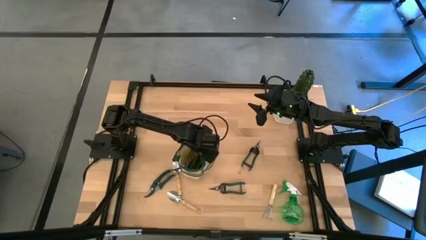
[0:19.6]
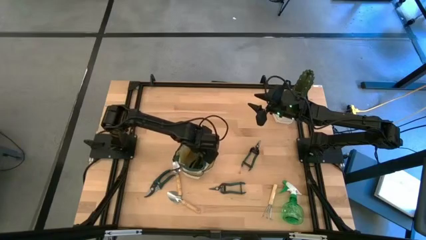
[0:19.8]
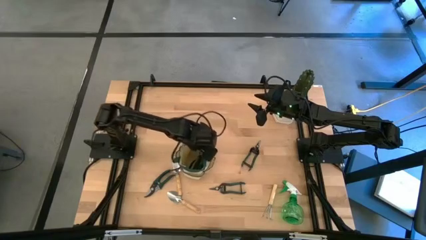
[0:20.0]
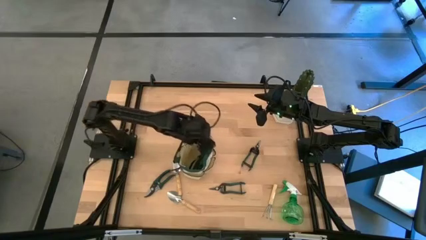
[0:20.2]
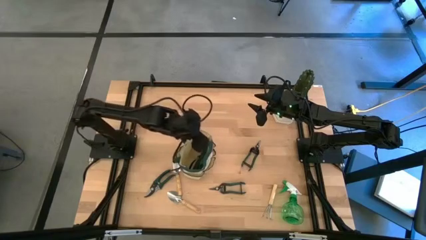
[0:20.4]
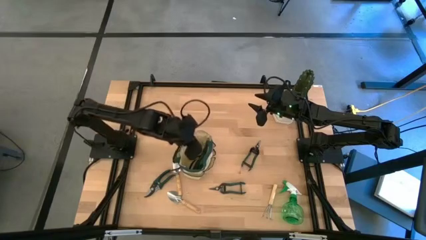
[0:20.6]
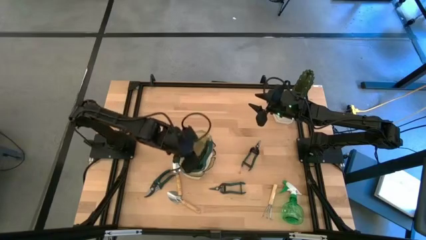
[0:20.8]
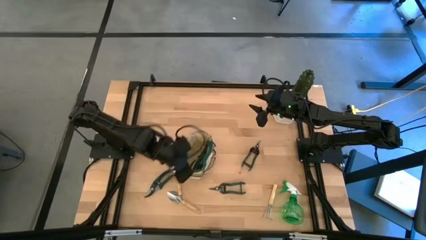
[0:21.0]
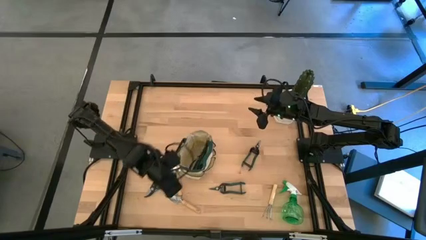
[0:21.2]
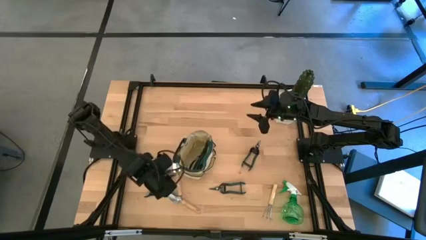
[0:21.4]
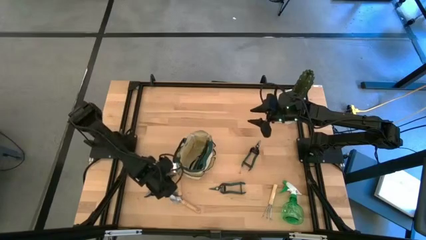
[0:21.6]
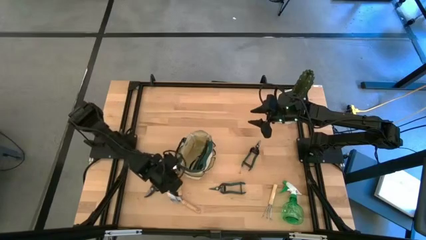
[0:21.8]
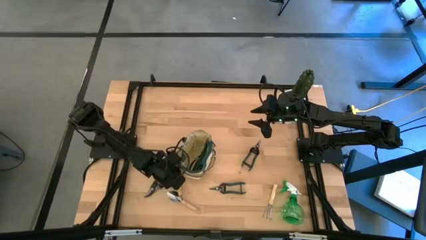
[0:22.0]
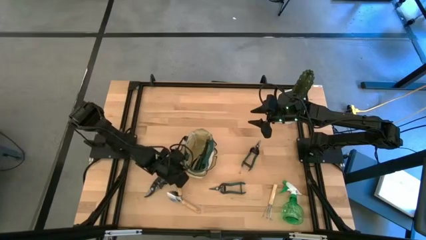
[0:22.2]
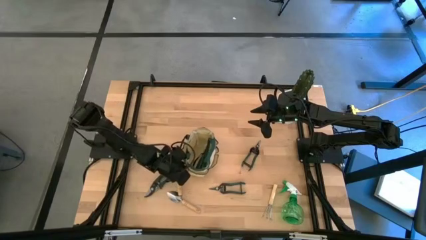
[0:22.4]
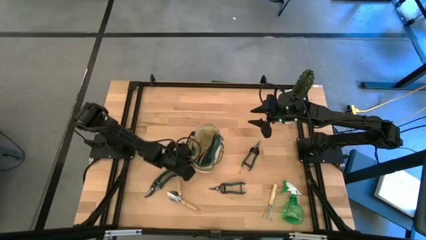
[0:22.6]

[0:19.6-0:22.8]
Task: Pick & Place Garden tools in Gardening bag
Adjust the green gardening bag

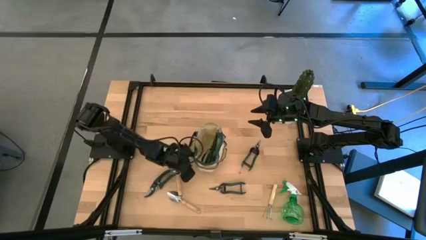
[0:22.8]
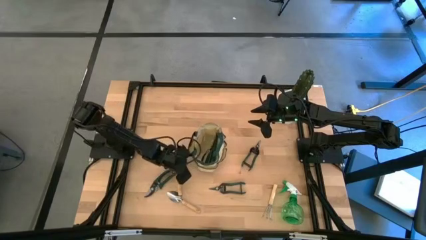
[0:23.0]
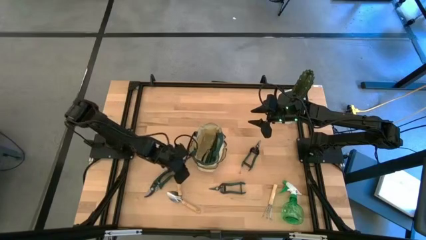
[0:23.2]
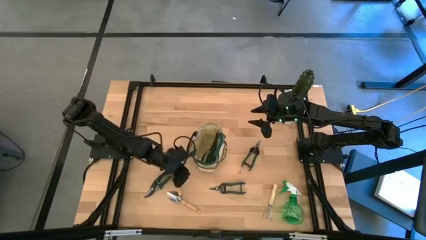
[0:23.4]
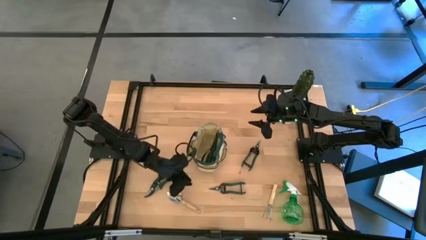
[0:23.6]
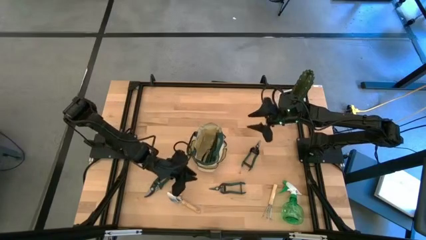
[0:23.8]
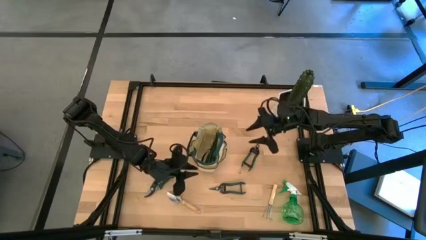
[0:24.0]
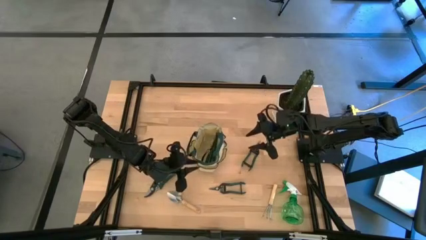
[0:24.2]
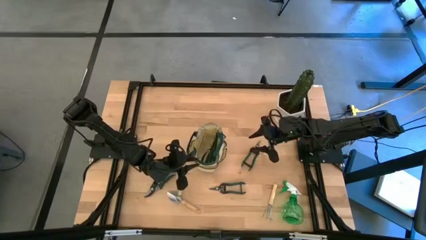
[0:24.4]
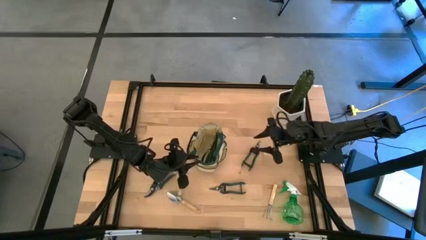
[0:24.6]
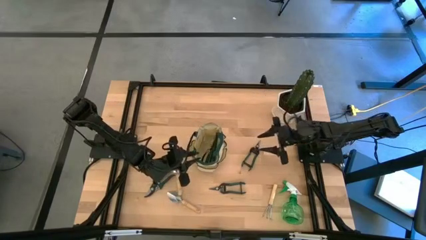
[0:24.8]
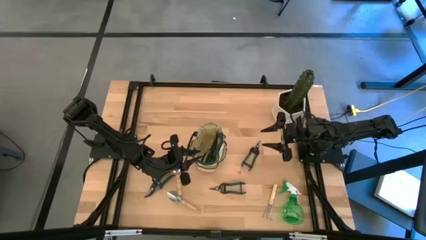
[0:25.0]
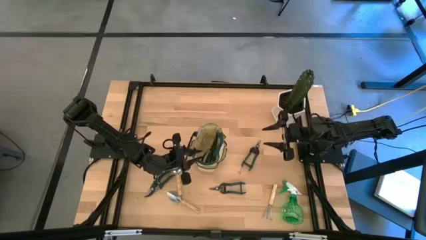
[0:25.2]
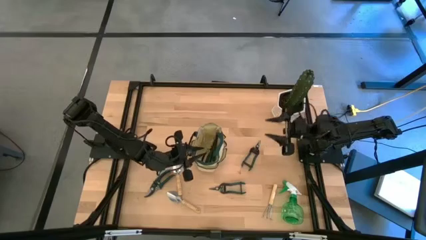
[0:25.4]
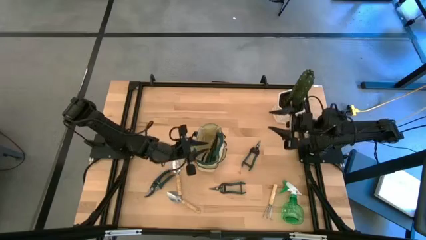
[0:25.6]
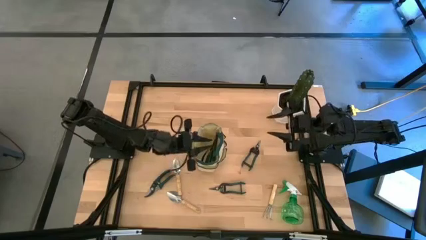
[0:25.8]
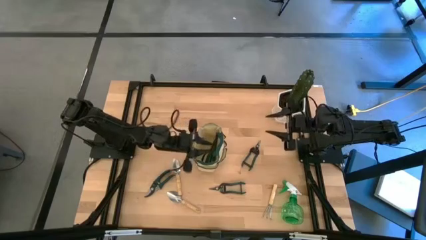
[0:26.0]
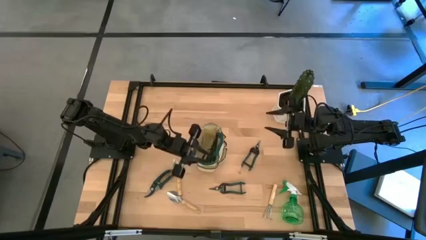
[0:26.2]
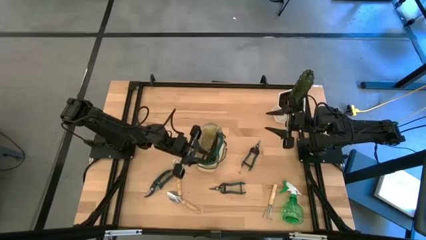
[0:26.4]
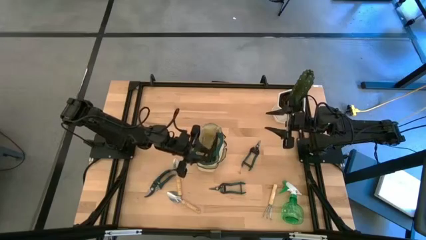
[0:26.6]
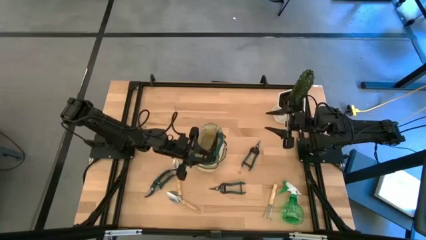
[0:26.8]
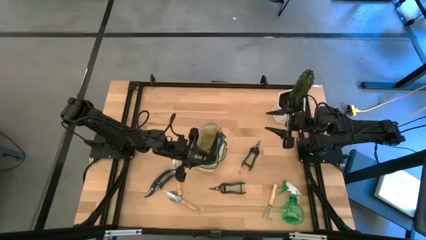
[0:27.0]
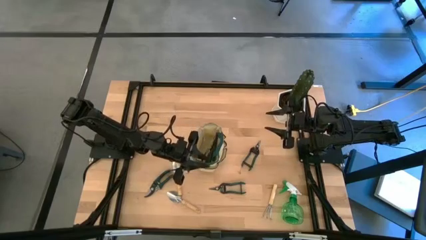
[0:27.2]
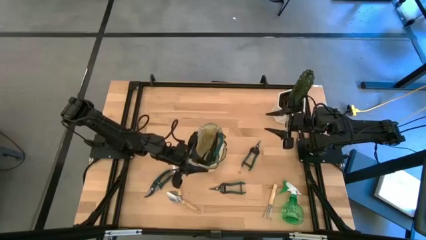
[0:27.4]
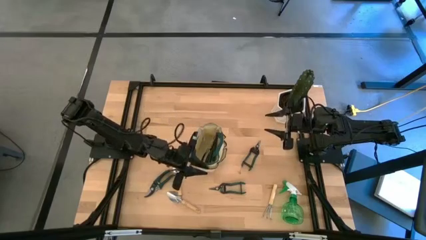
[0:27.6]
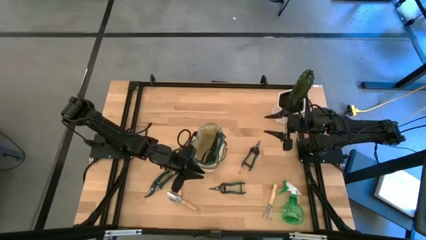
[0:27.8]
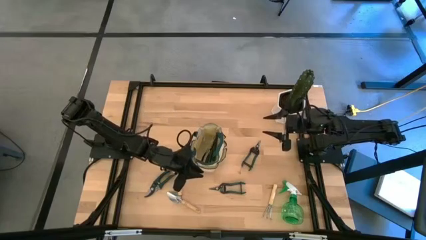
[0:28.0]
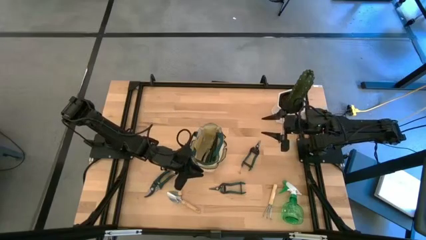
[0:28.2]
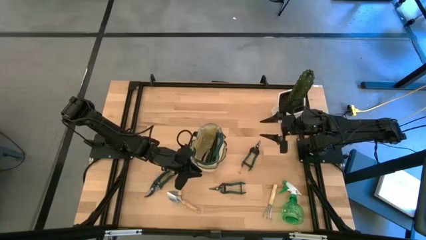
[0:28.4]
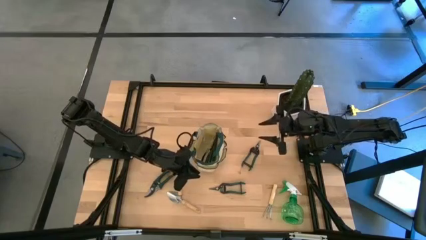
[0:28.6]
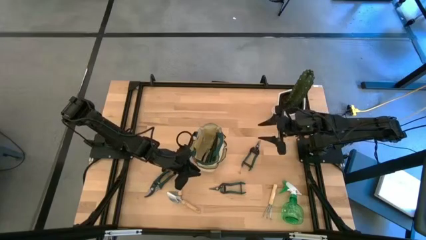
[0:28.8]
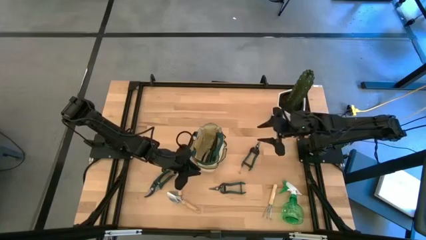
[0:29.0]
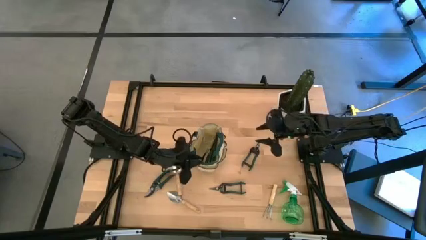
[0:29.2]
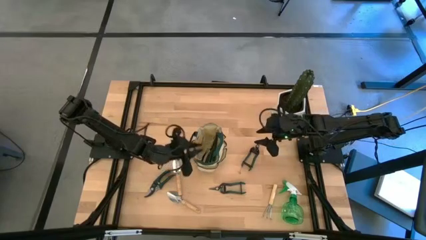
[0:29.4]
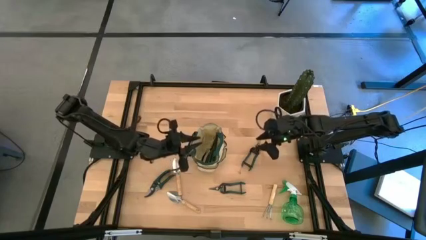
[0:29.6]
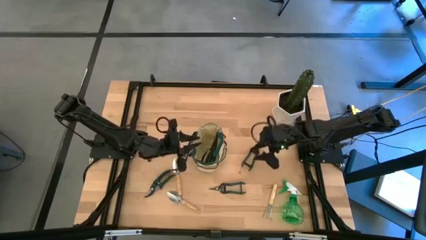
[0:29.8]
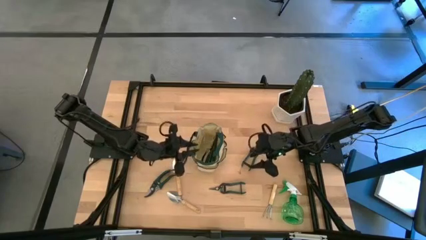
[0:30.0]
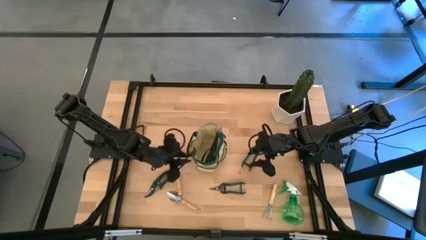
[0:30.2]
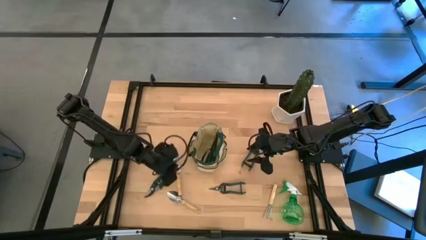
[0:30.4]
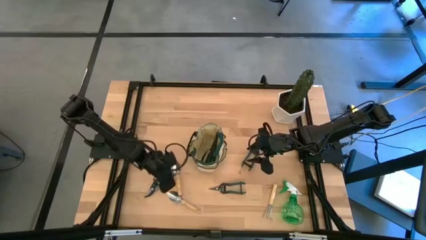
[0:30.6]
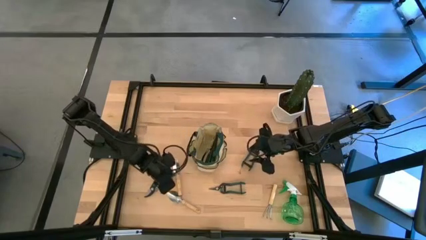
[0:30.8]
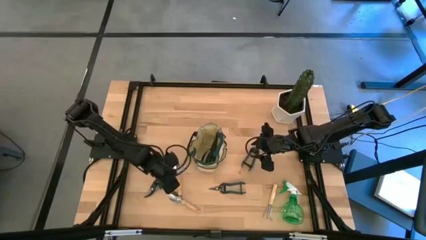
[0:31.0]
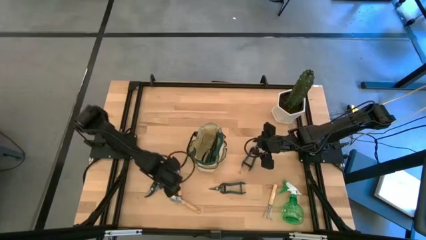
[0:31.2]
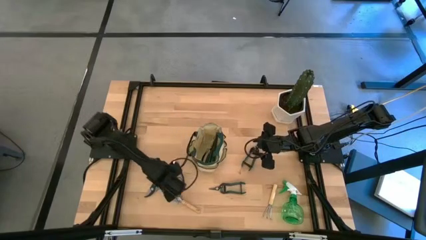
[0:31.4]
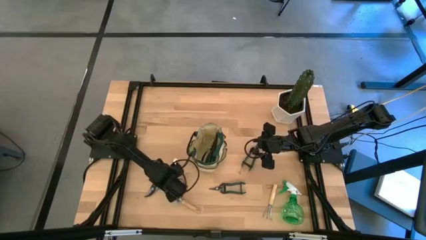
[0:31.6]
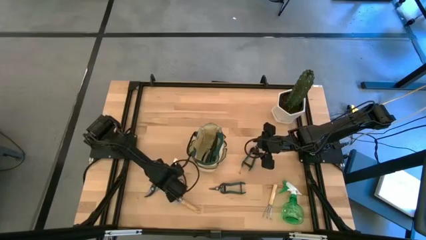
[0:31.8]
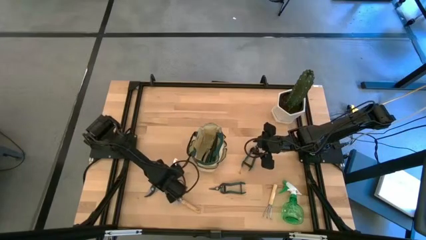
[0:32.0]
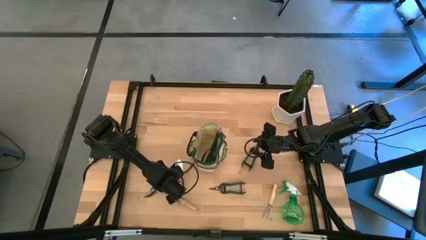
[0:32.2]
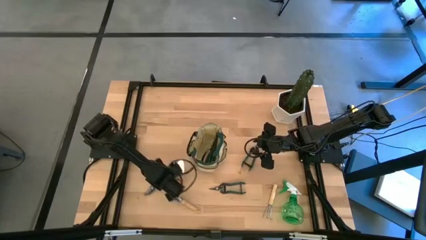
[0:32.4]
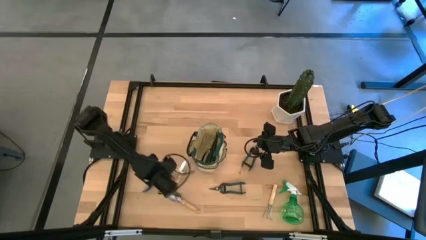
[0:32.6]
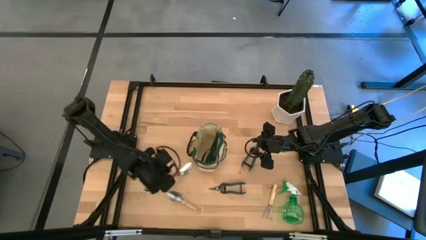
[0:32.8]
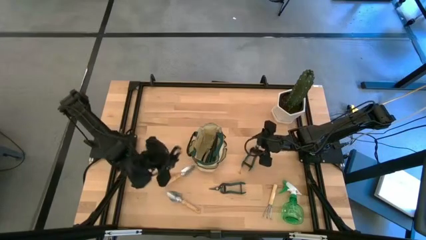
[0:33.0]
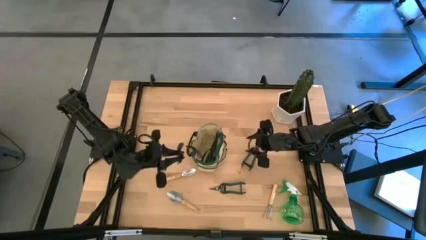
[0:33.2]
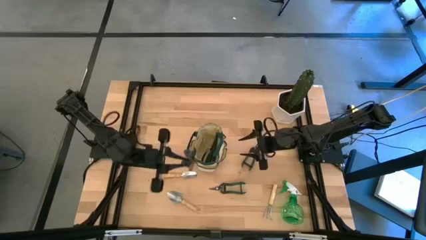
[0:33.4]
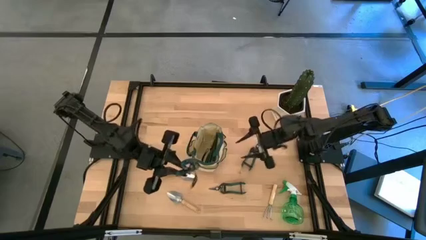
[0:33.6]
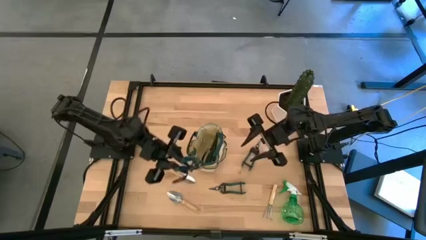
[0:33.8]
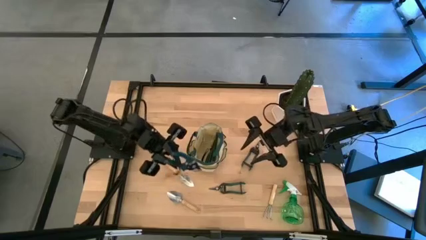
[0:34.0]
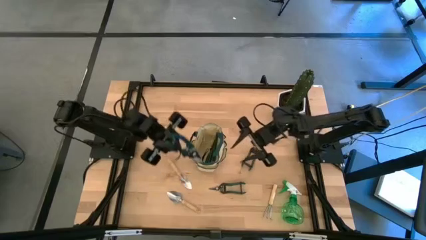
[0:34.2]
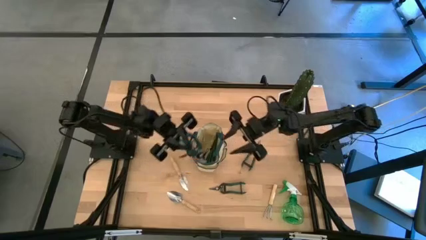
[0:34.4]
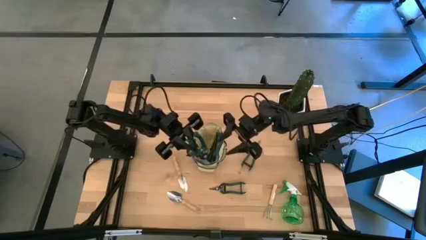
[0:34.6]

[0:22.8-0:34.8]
Put the green shear scissors into the green gardening bag
